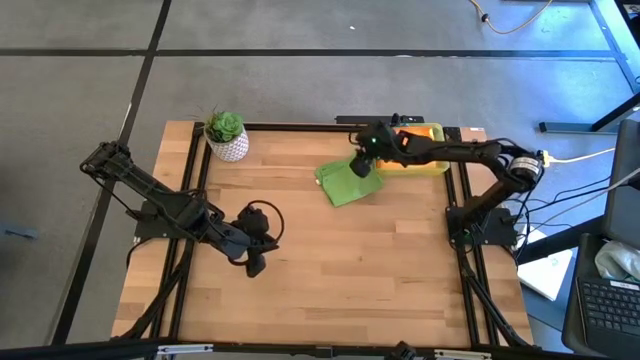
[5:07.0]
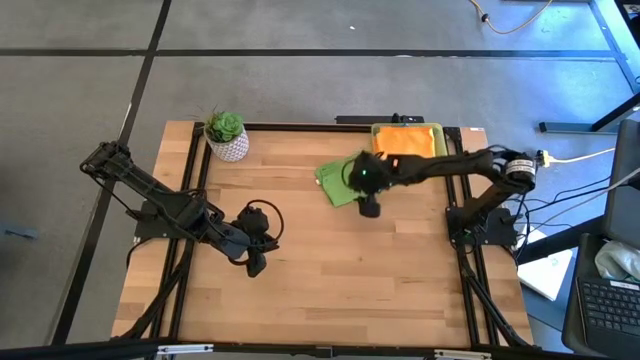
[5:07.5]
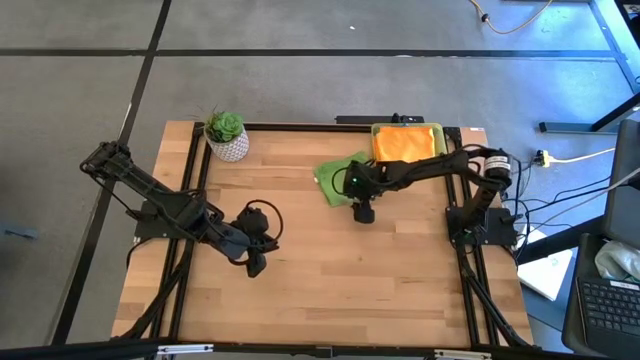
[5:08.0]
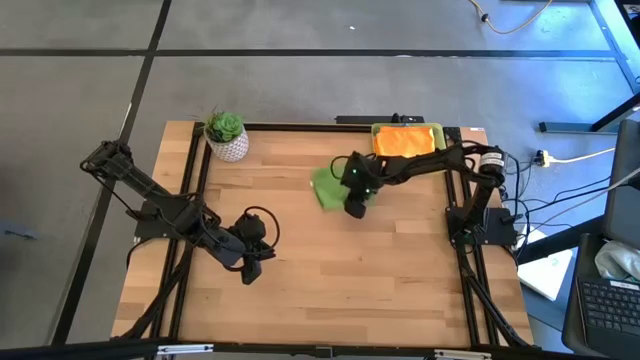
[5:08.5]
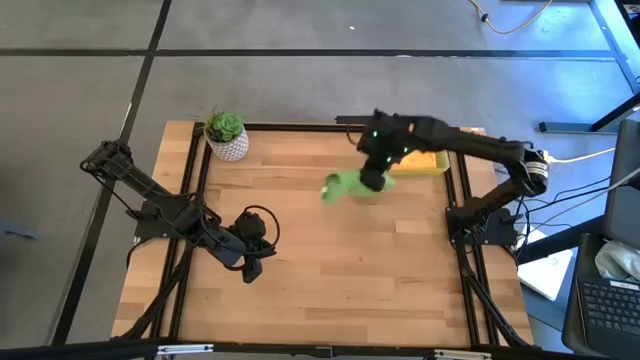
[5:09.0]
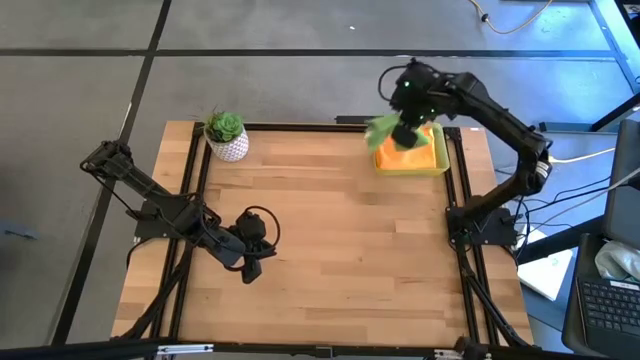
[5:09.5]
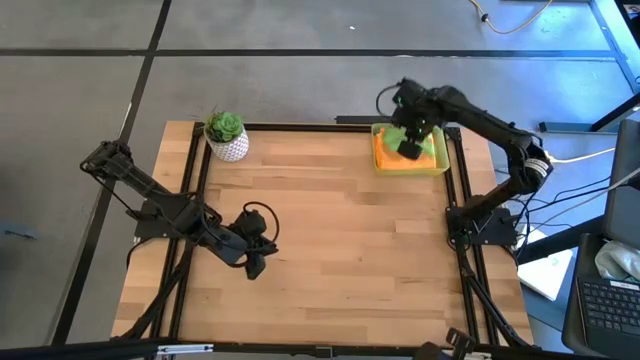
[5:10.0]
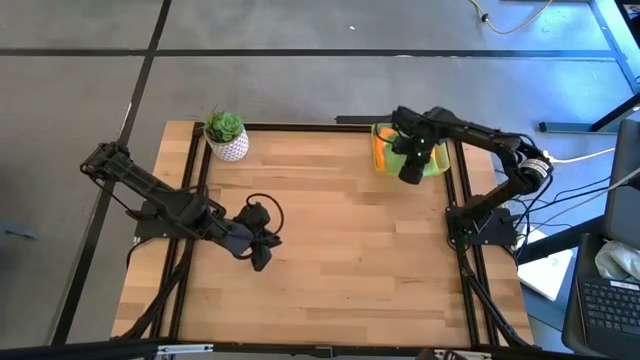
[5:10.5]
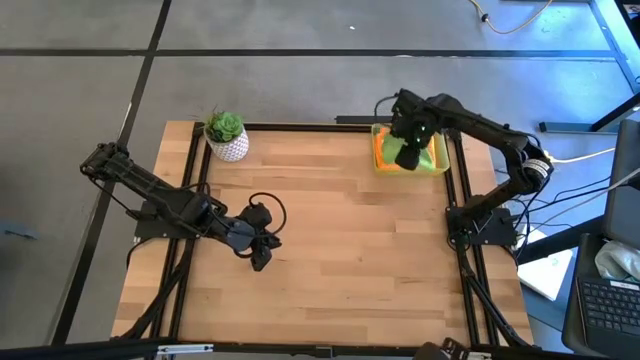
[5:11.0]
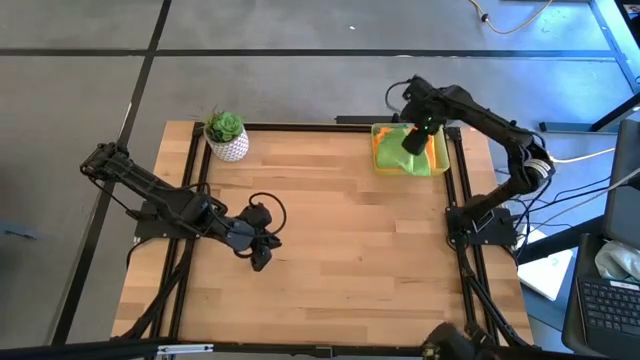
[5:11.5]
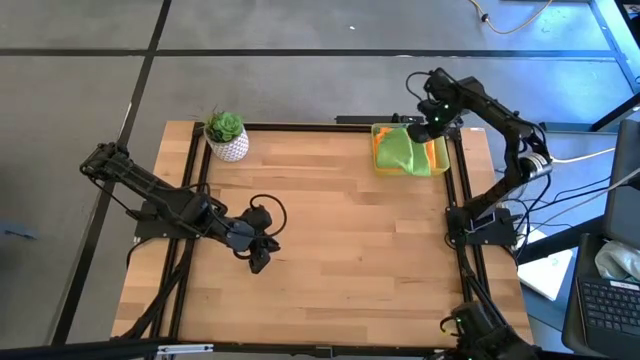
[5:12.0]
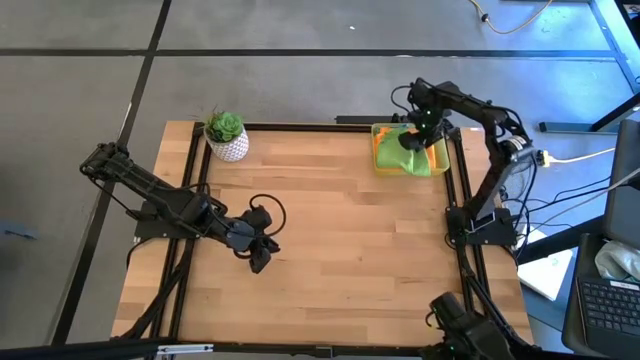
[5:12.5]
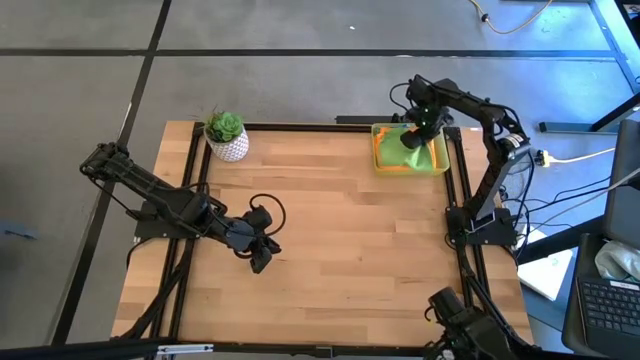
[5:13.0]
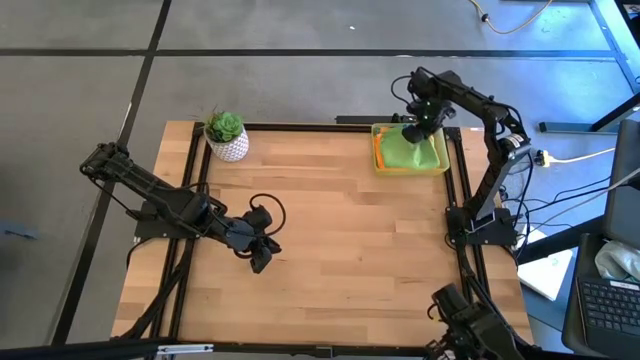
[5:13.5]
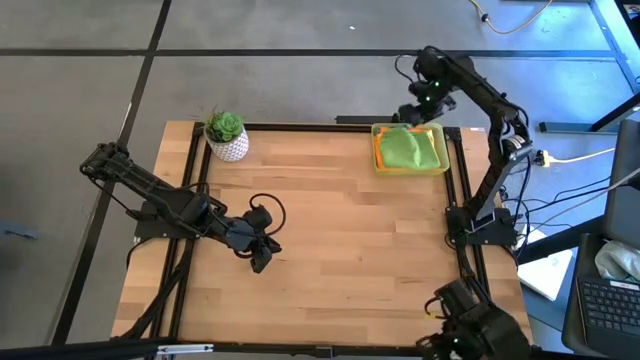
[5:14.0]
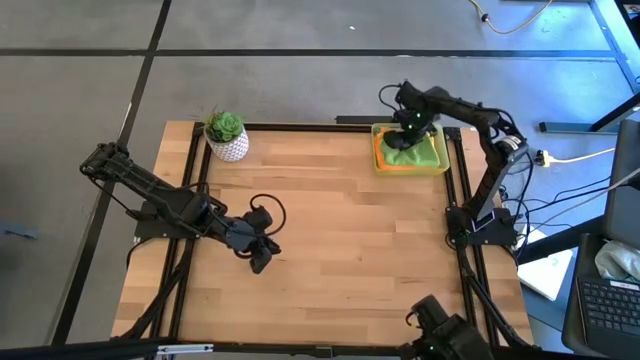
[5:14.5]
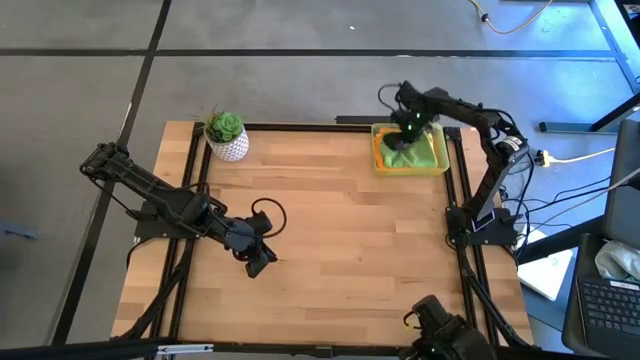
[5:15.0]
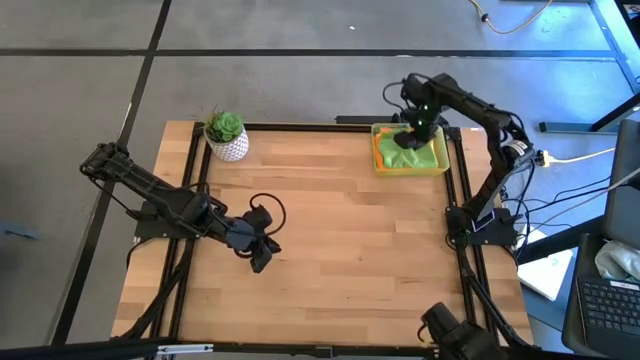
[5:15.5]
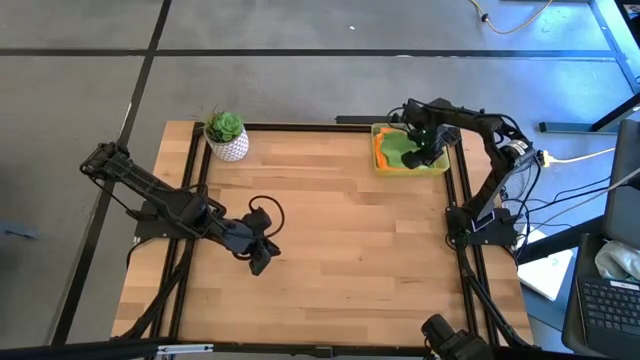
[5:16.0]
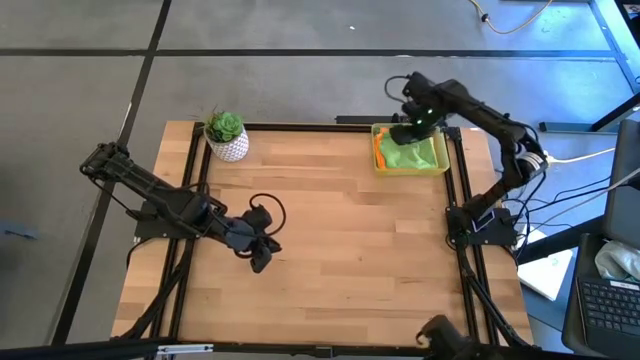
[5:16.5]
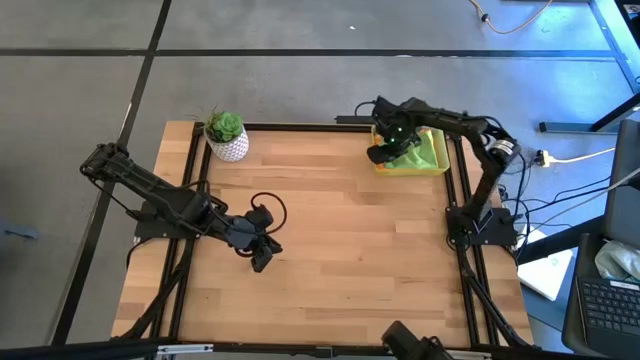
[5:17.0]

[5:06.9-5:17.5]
Task: Fold microfiber towels
Put the folded green microfiber towel into the bin

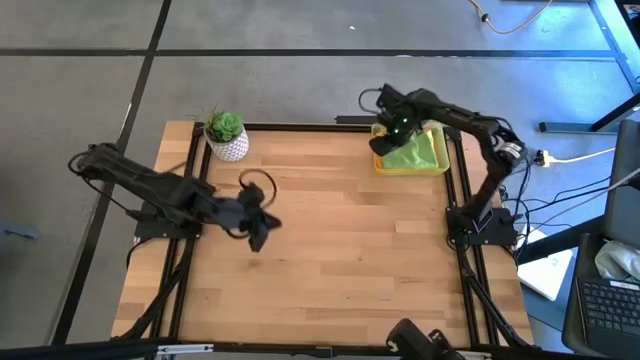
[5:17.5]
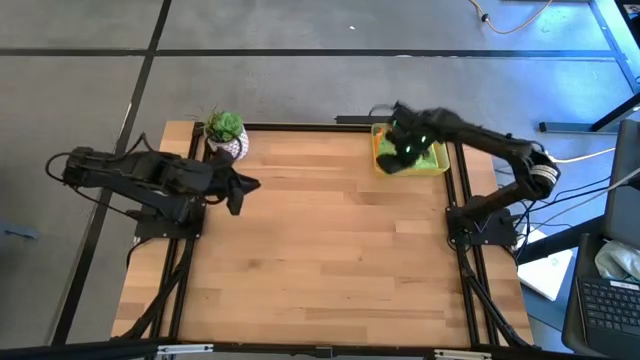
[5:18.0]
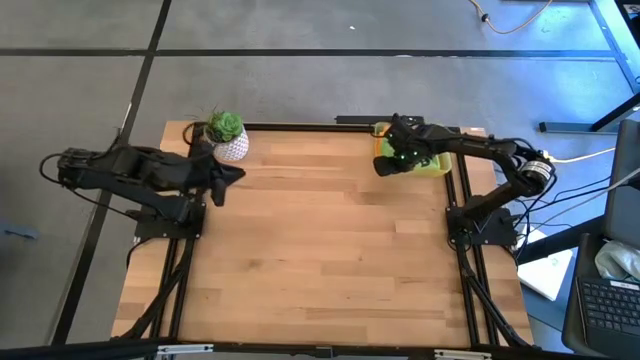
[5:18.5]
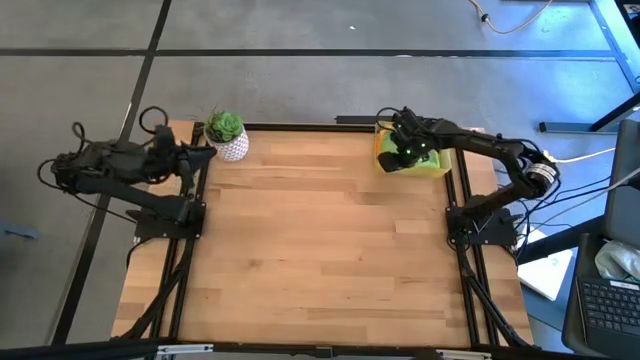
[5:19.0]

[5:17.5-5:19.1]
Adjust the bin

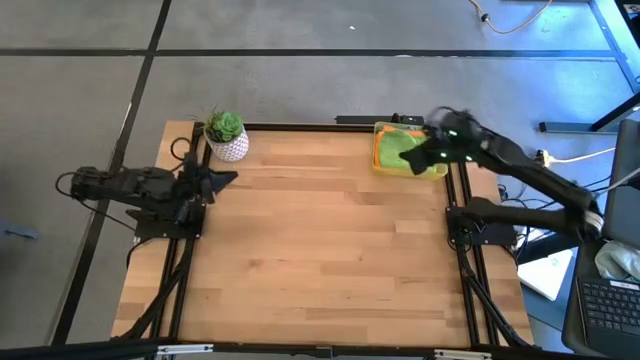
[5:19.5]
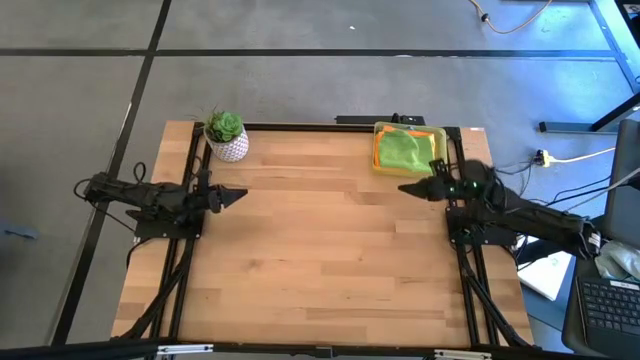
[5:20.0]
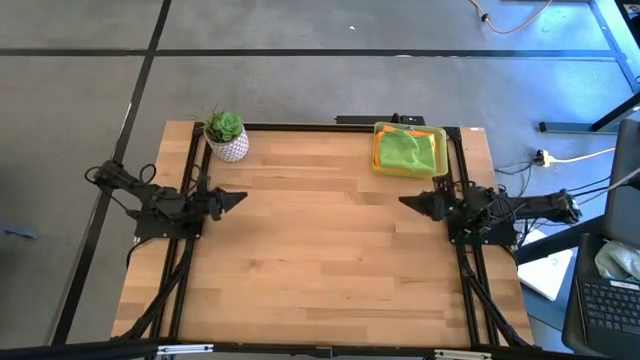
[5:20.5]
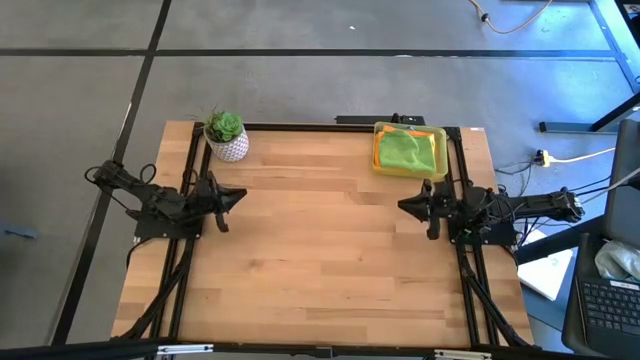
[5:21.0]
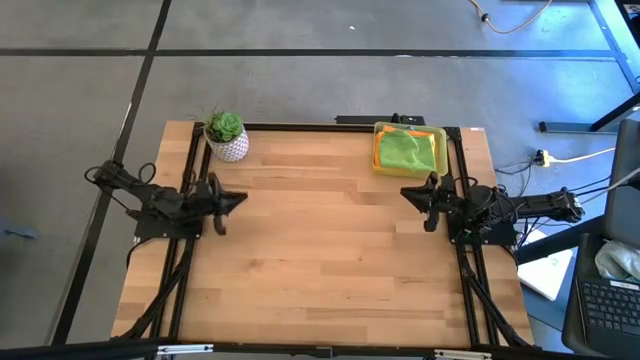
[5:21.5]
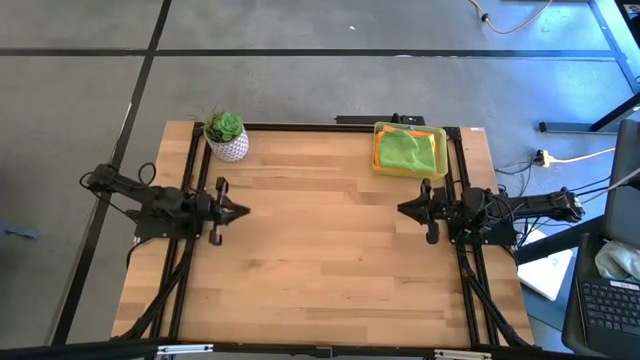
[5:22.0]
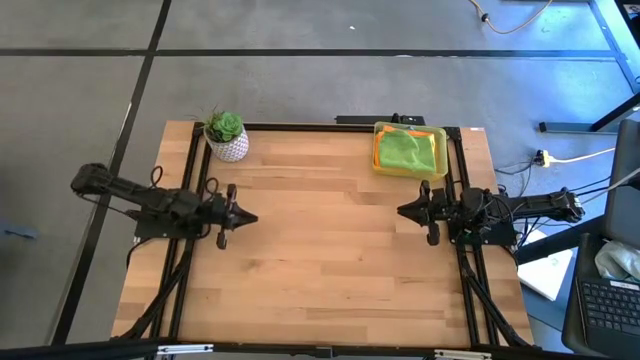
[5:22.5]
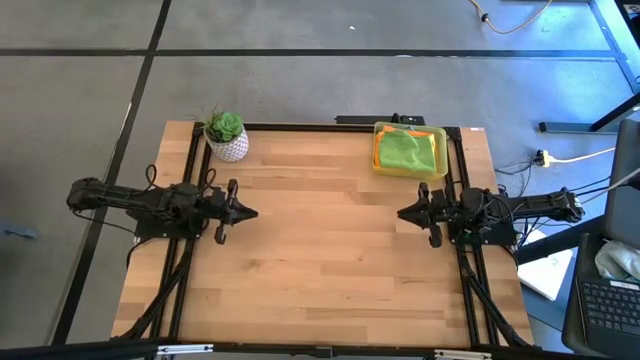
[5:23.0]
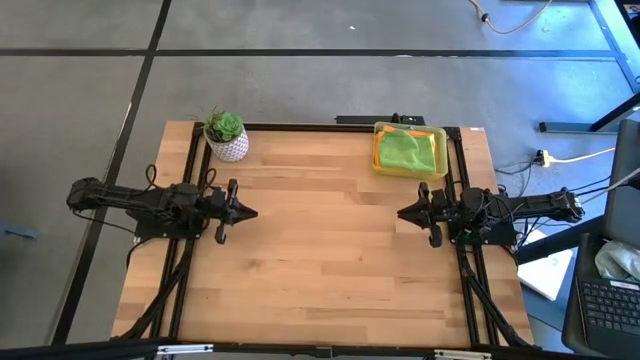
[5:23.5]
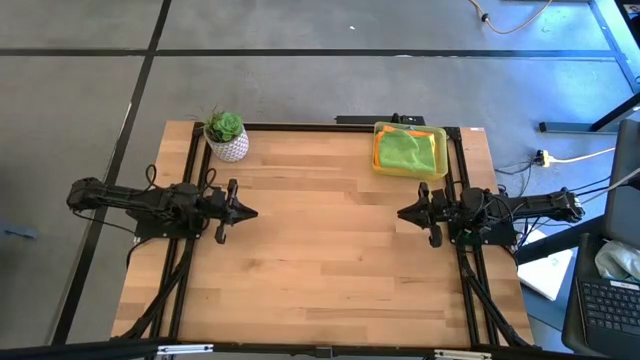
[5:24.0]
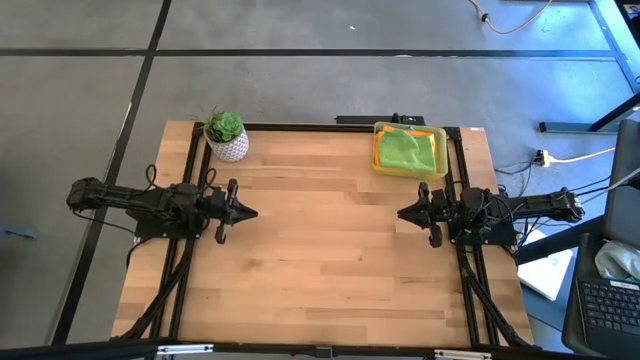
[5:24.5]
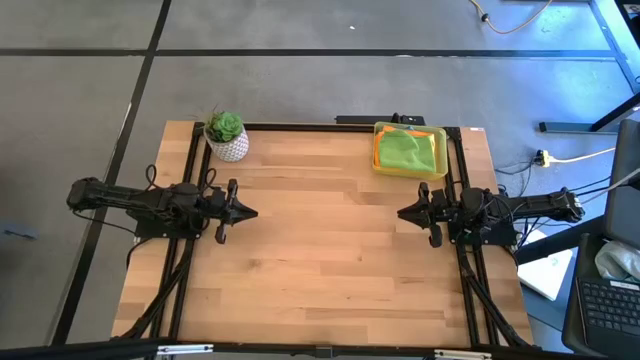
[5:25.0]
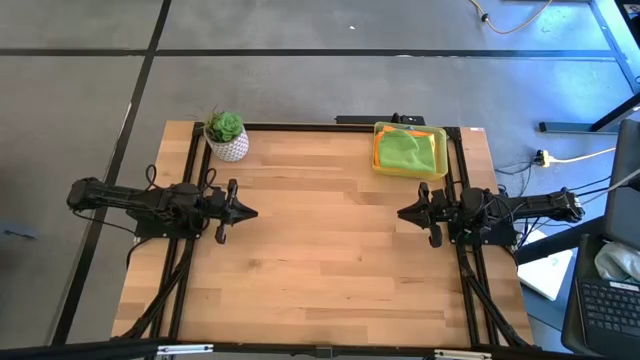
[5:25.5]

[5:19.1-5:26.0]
Return to Home Position

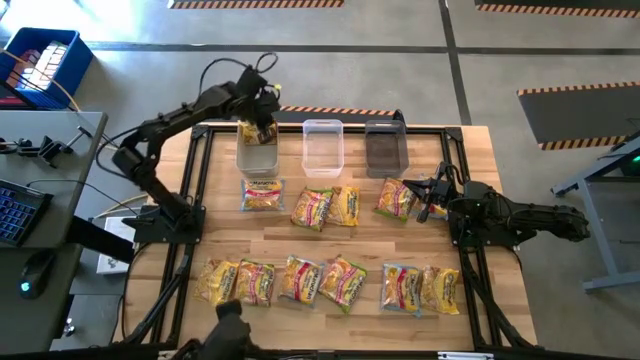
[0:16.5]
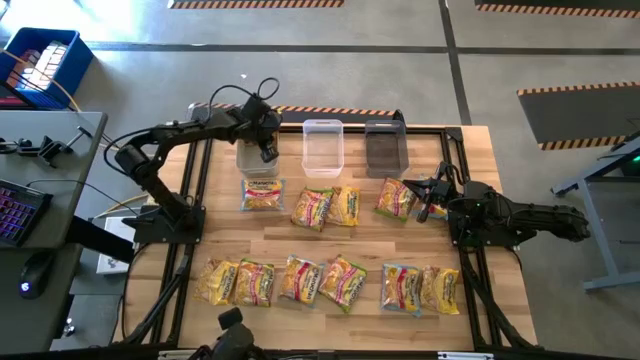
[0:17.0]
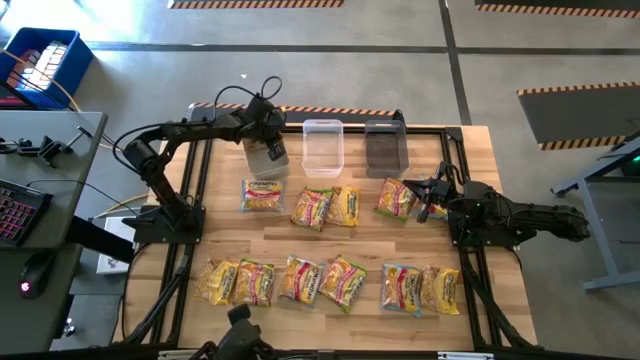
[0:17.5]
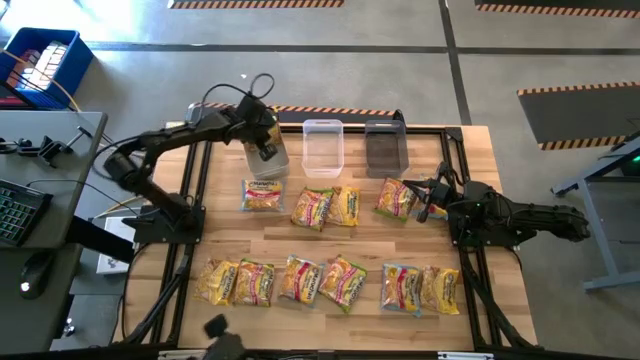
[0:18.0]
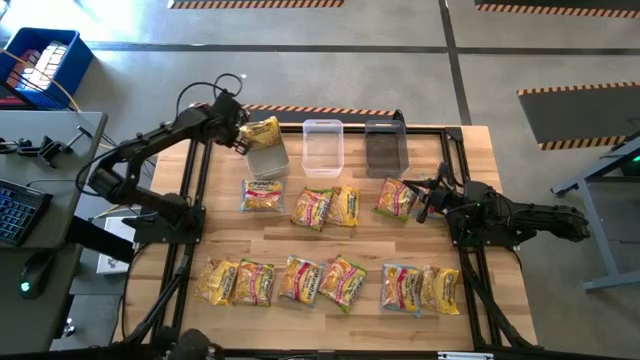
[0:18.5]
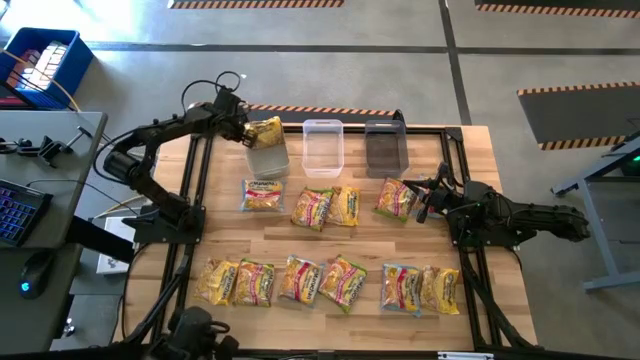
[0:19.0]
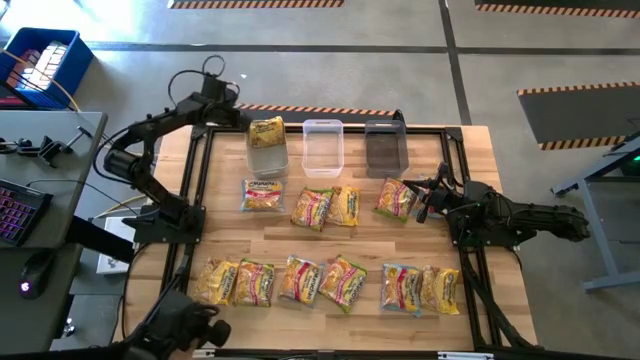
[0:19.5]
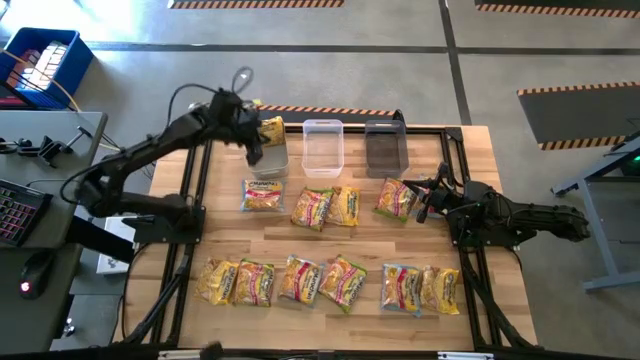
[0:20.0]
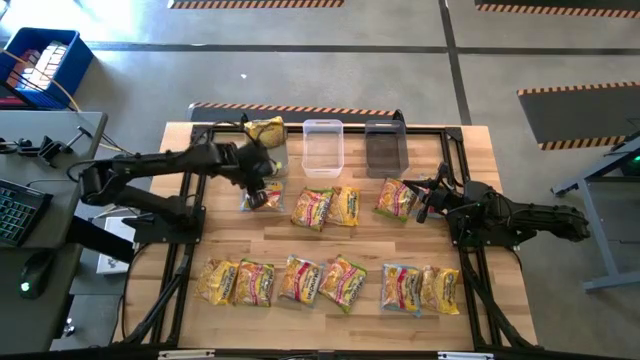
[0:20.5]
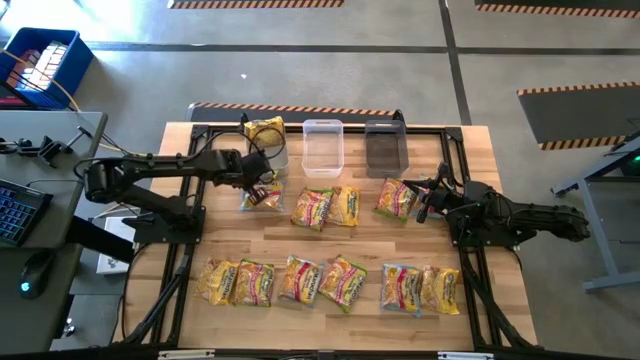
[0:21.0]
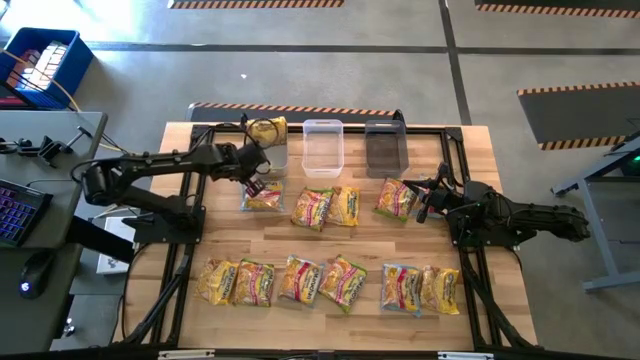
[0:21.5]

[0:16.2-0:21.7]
Task: Sort Maruchan noodles
Adjust the gray bin to align with the other bins
